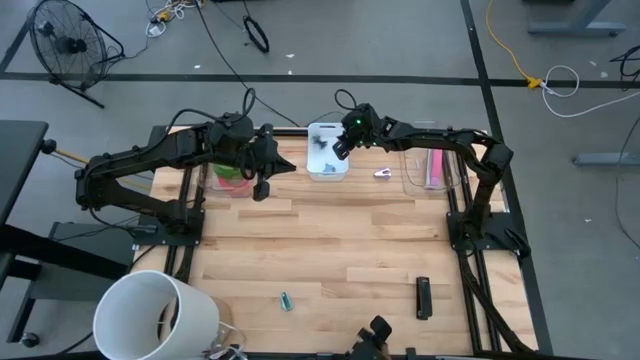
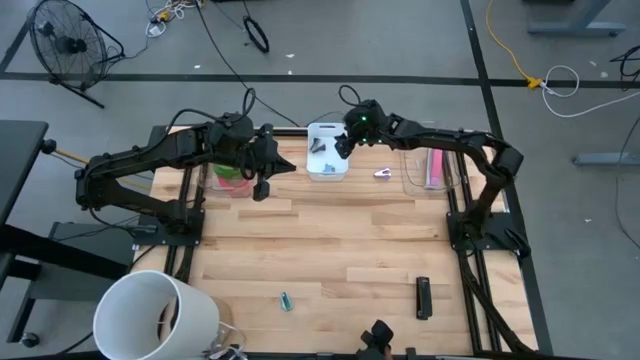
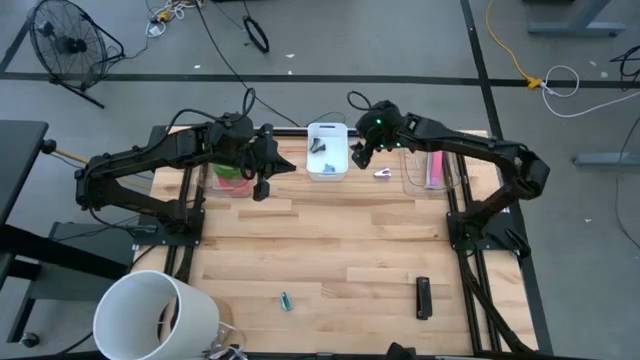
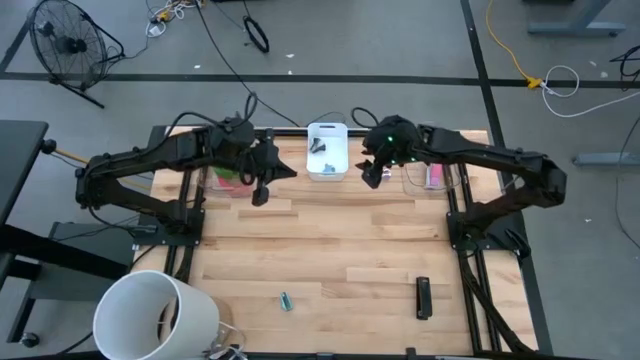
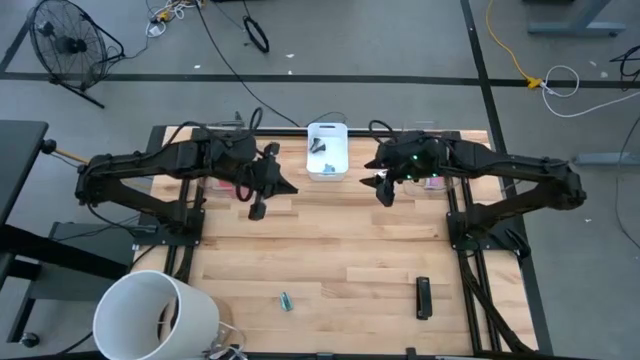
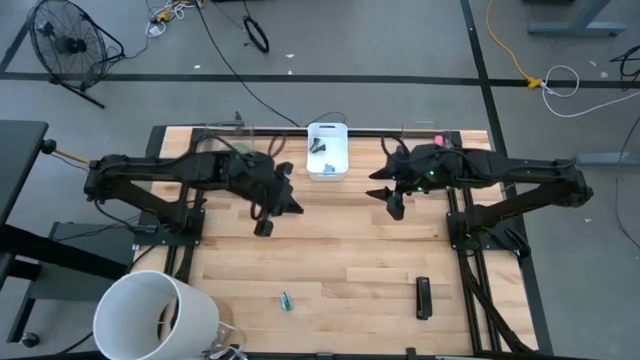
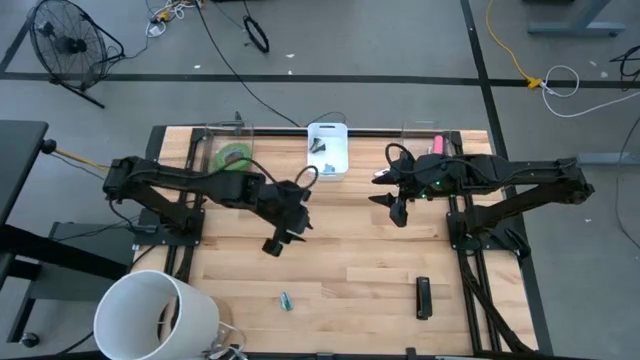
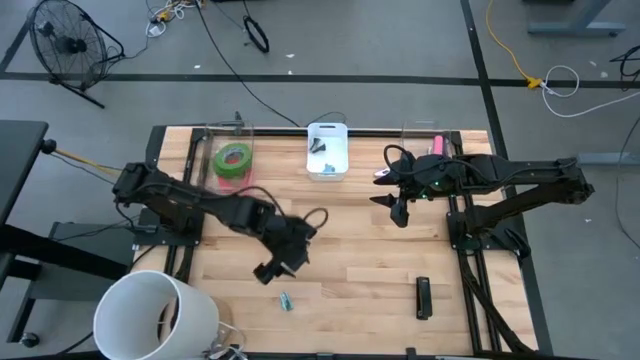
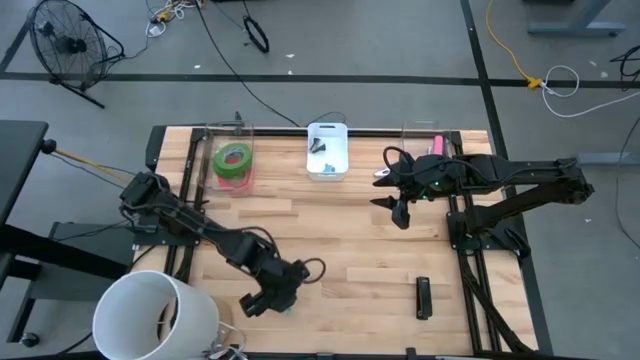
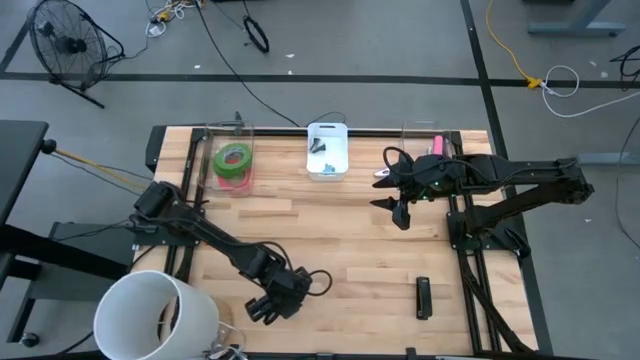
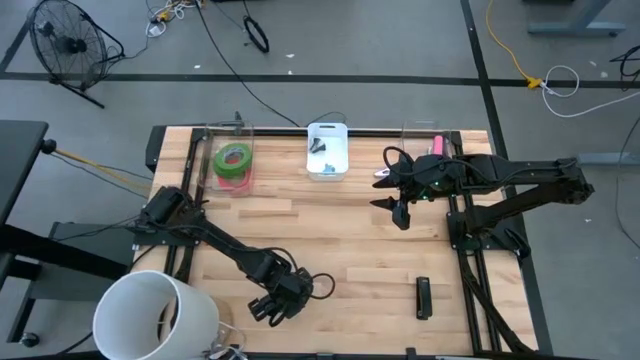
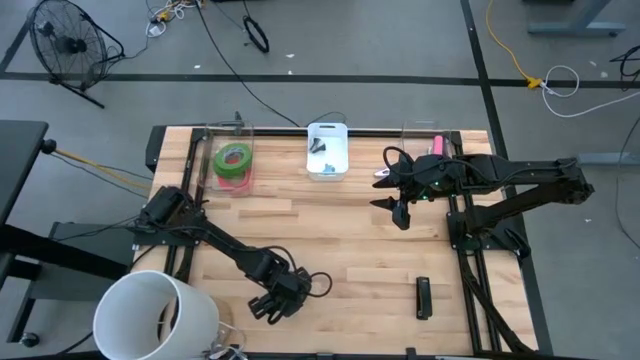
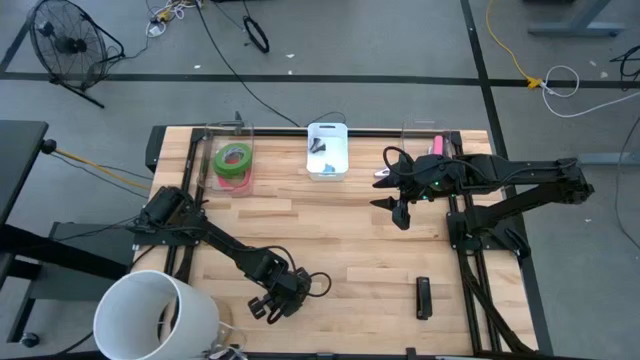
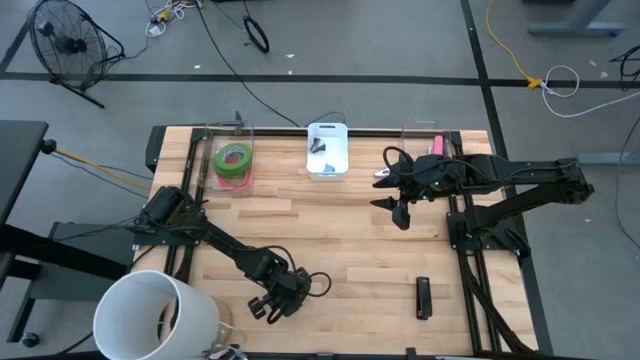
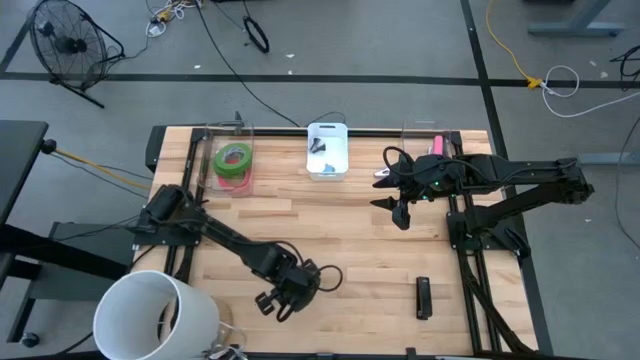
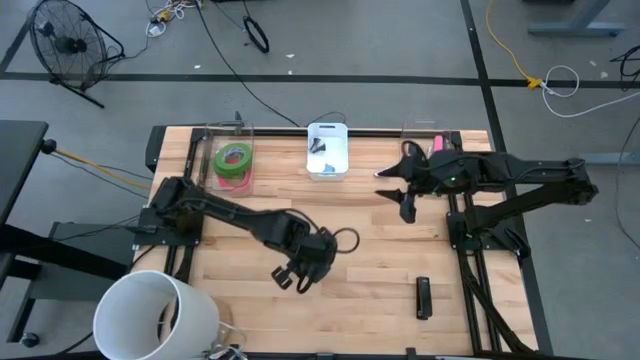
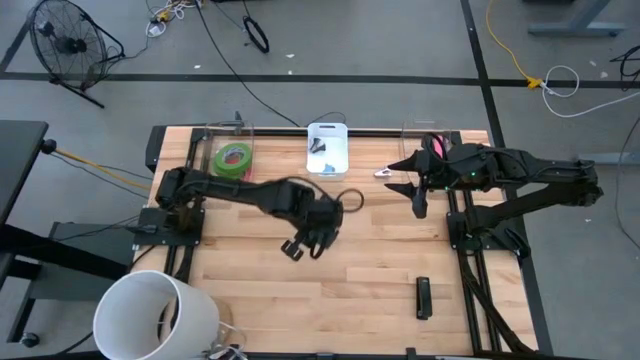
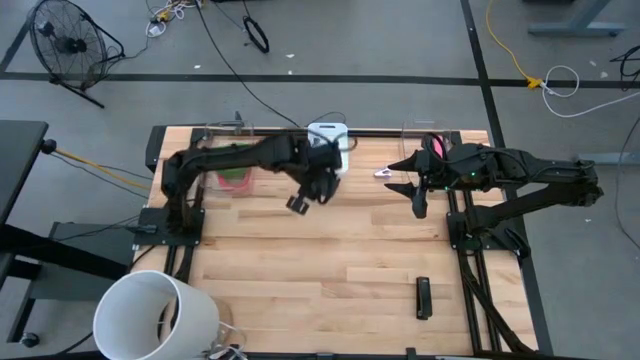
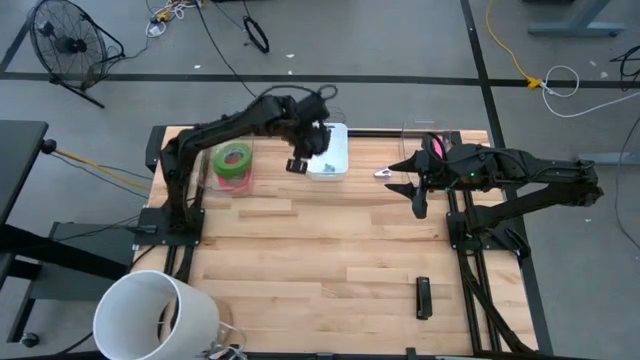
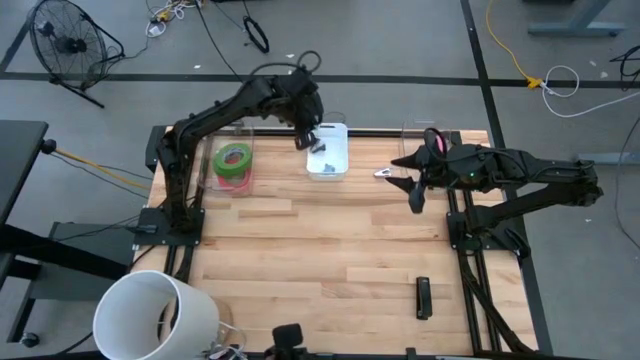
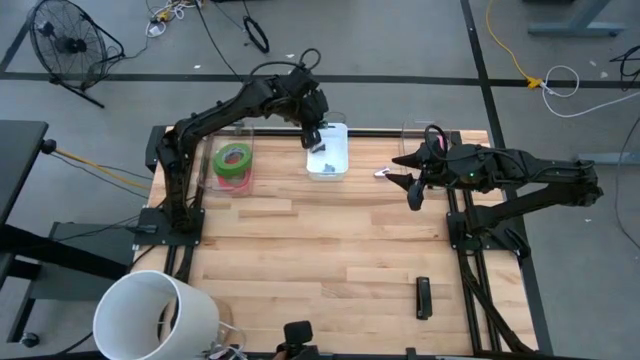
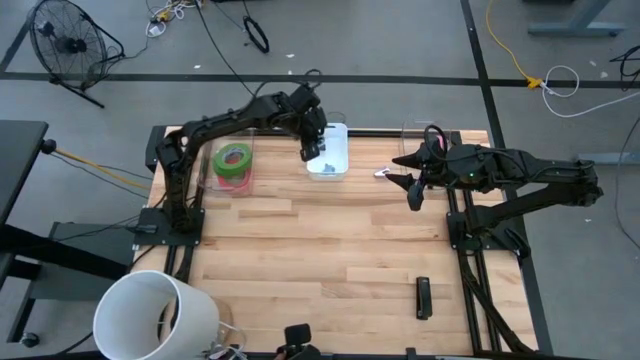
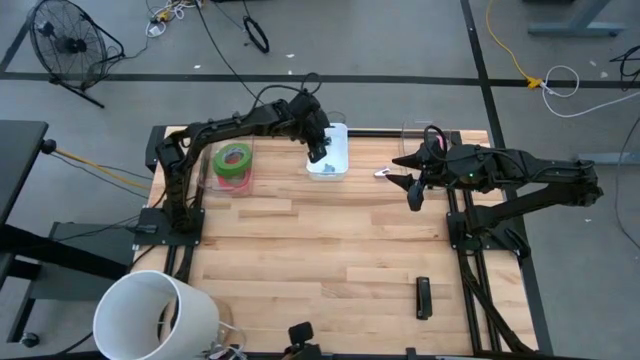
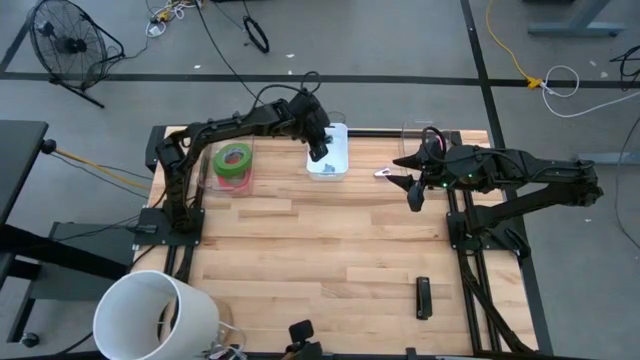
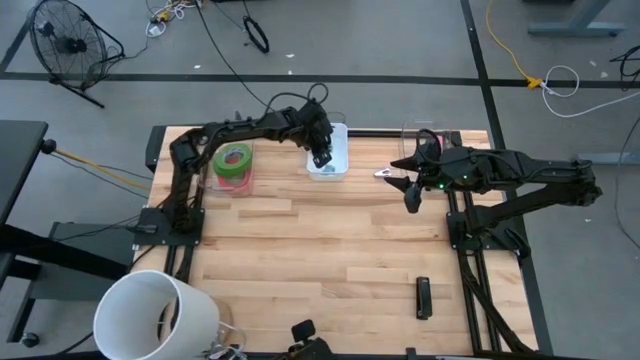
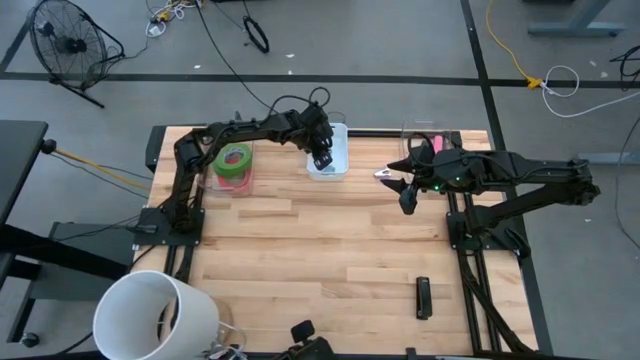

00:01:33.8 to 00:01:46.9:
Task: Pick and place Stapler, Stapler remover, tape
Put the light blue staple remover into the white bin

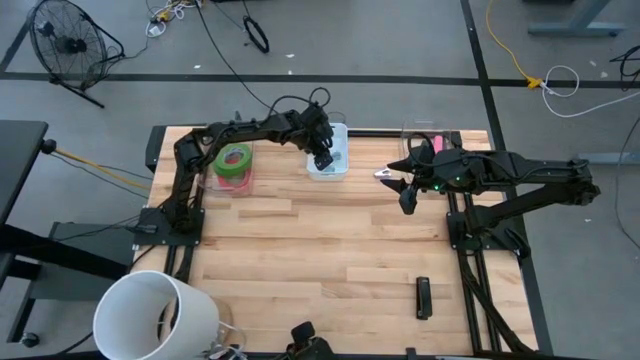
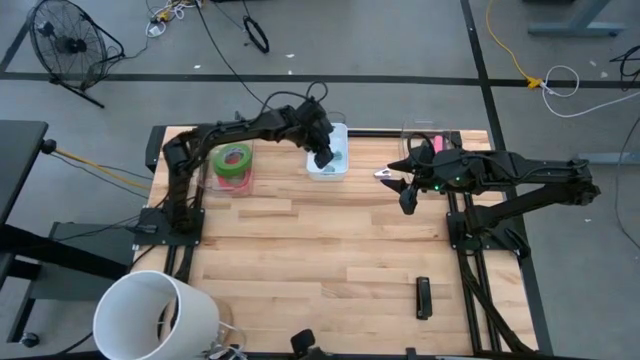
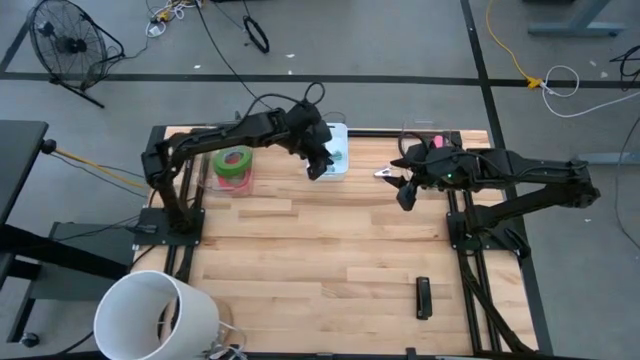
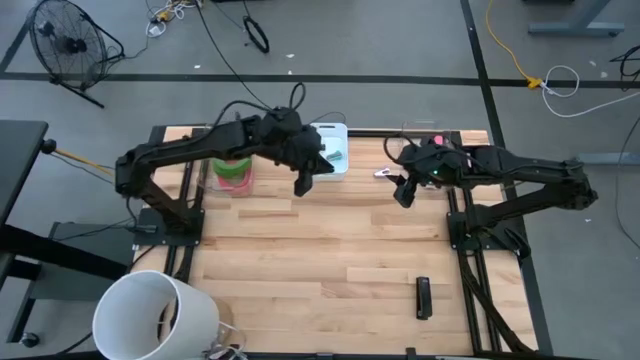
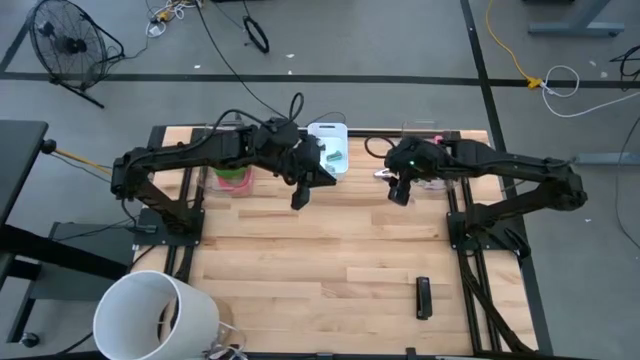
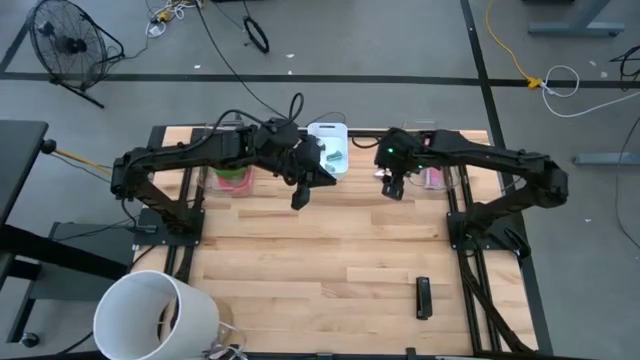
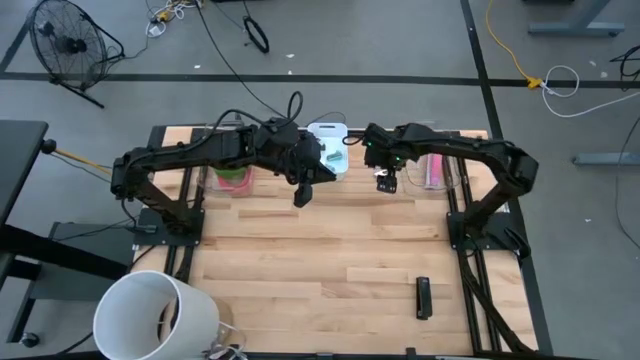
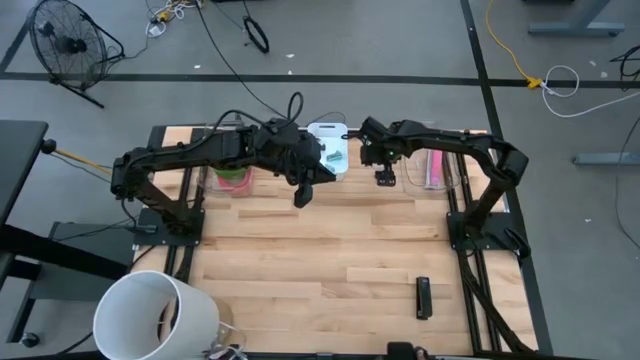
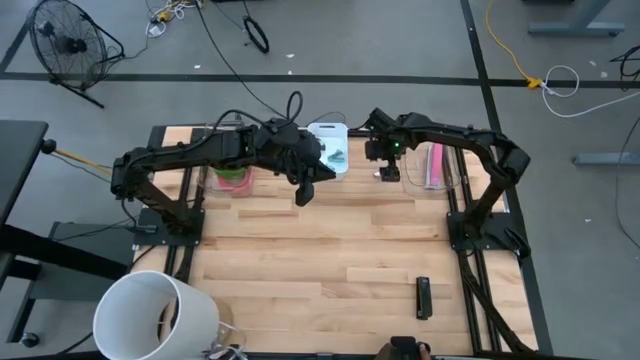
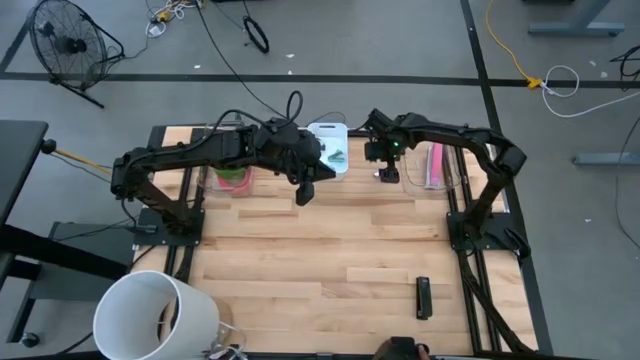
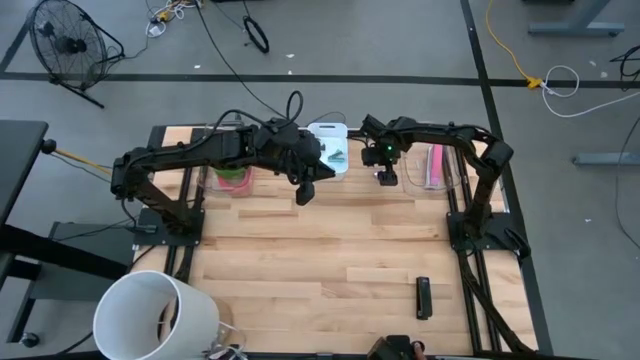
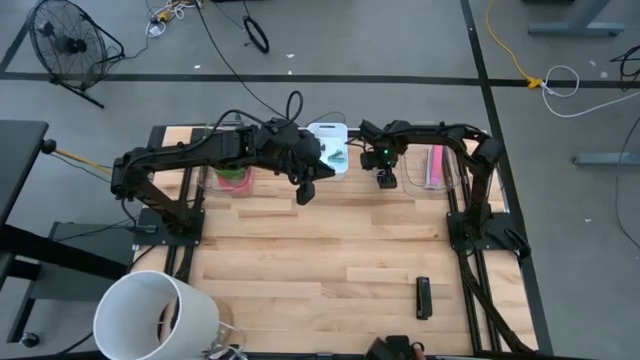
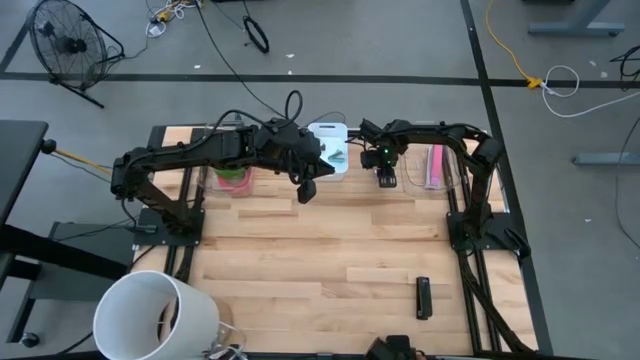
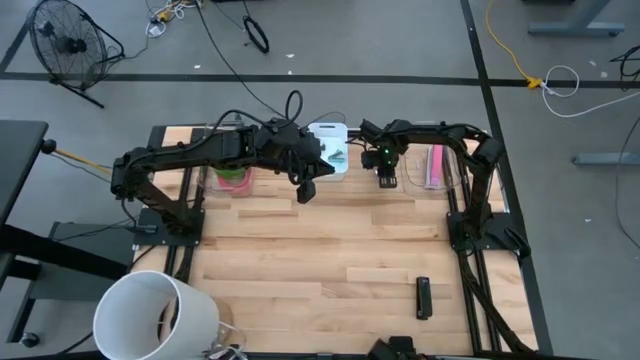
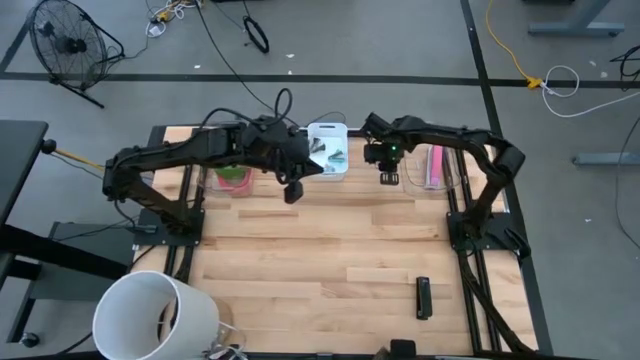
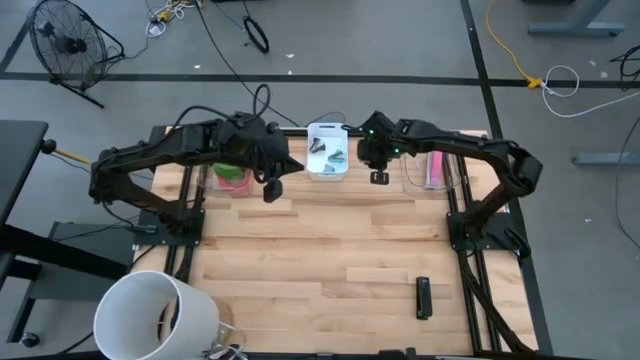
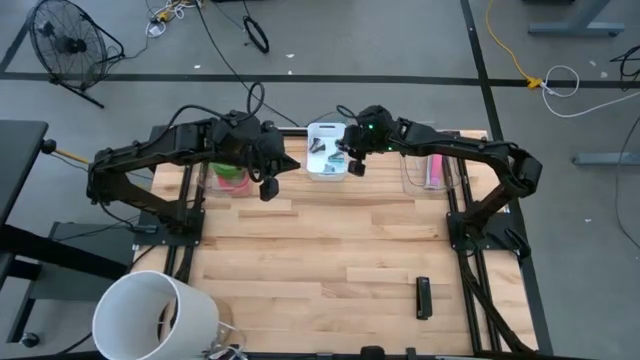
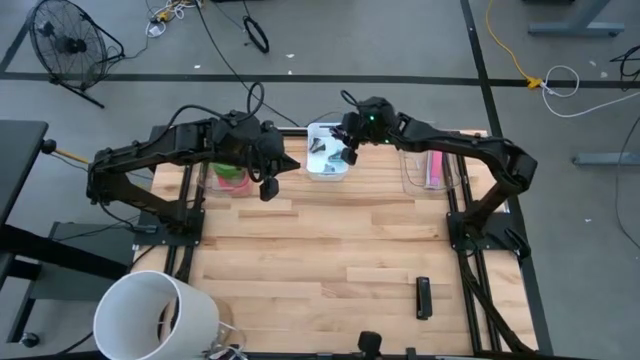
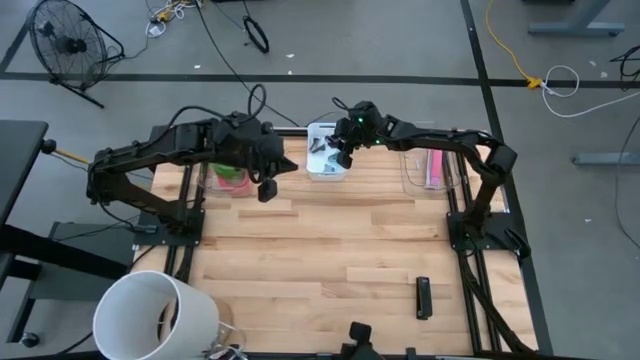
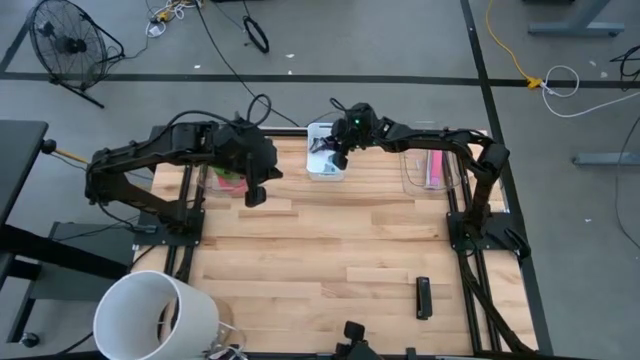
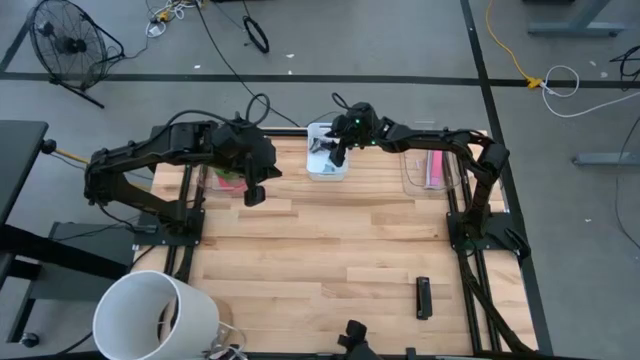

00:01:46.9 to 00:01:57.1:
Put the purple staple remover into the white bin
